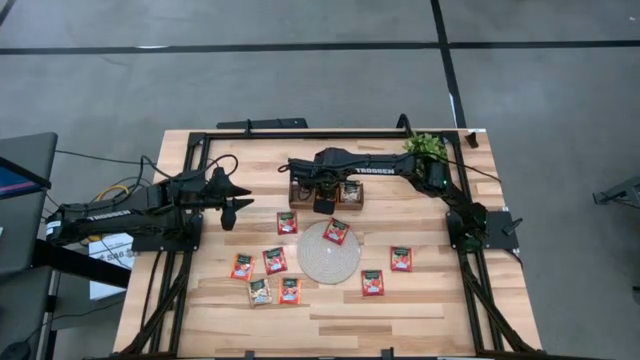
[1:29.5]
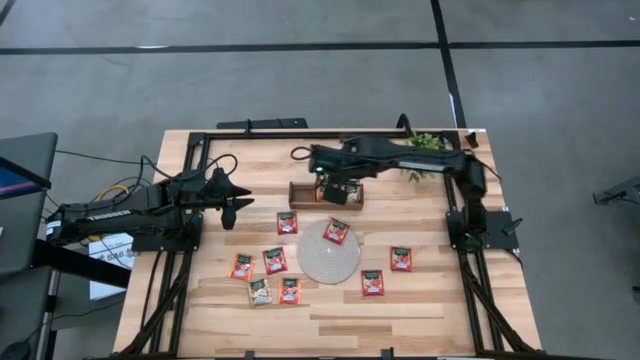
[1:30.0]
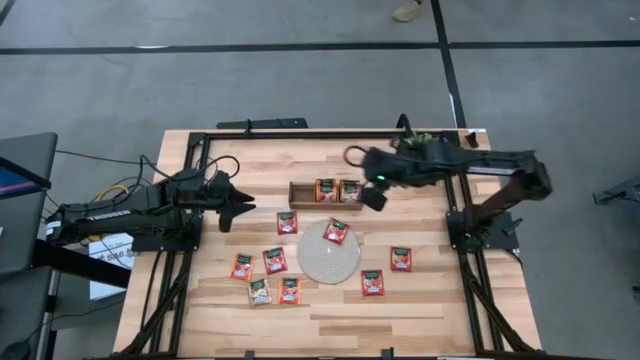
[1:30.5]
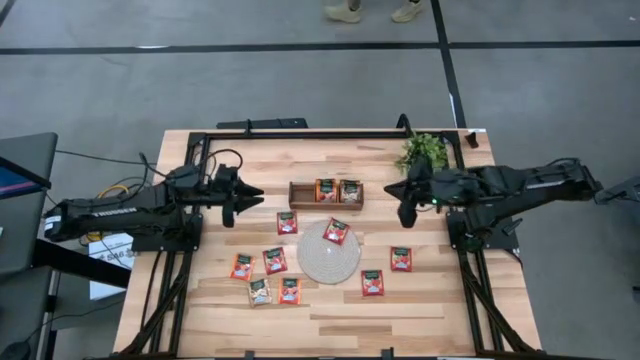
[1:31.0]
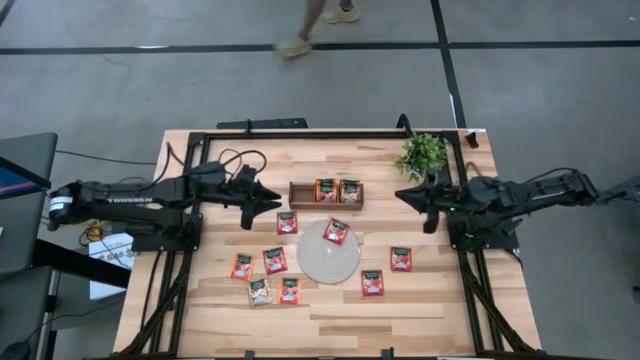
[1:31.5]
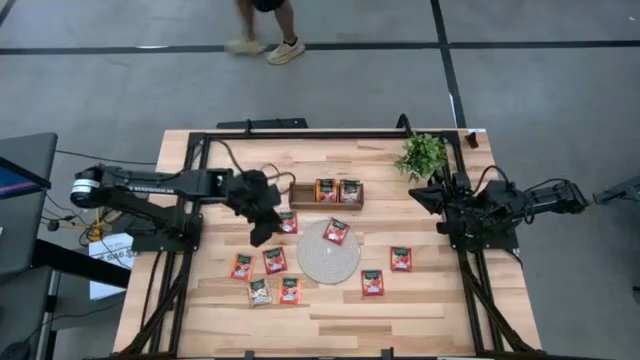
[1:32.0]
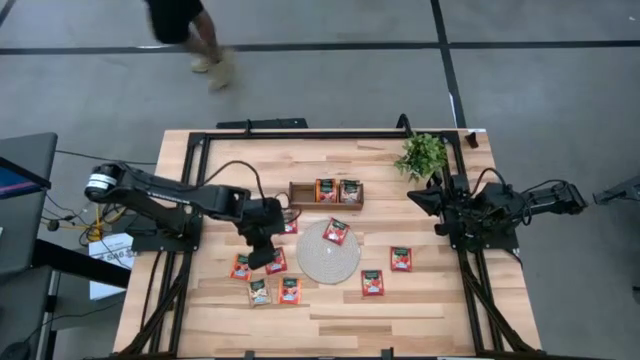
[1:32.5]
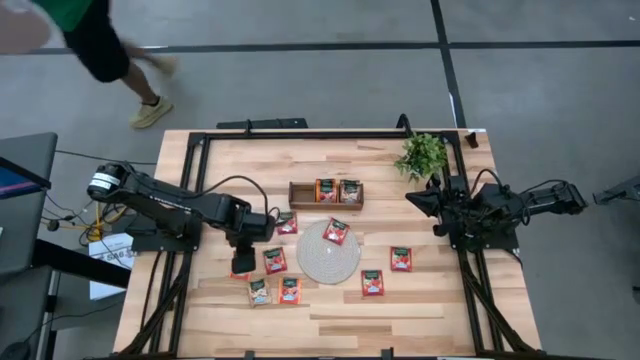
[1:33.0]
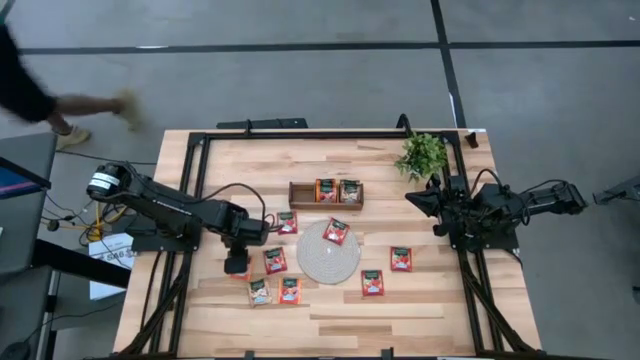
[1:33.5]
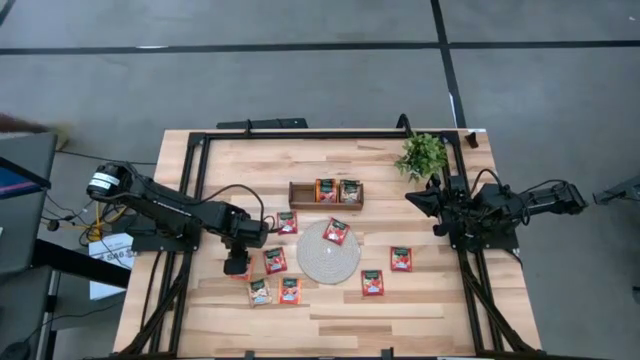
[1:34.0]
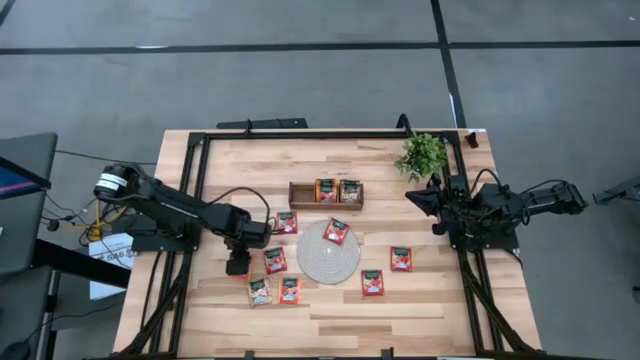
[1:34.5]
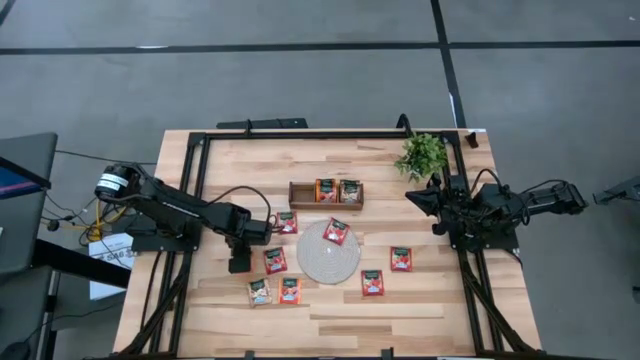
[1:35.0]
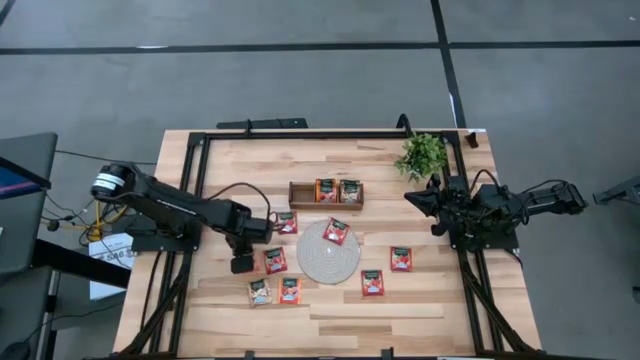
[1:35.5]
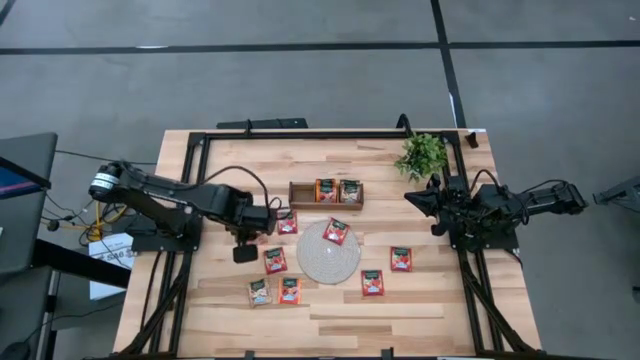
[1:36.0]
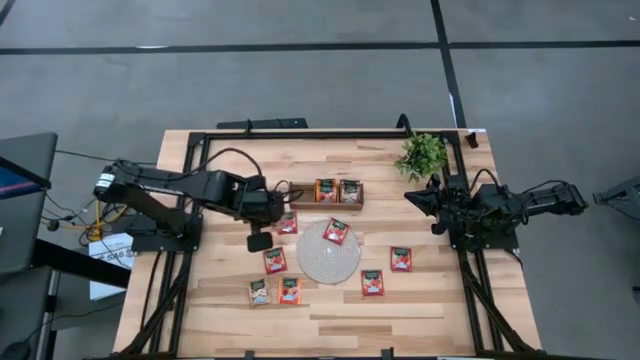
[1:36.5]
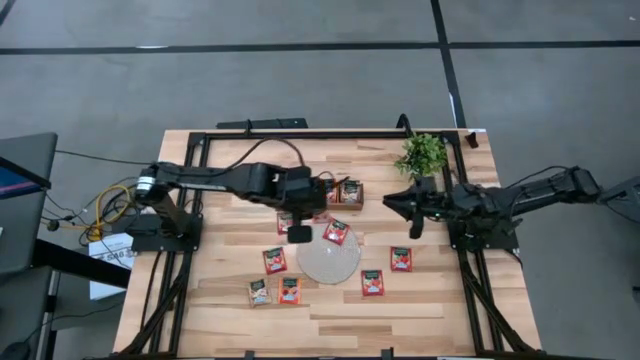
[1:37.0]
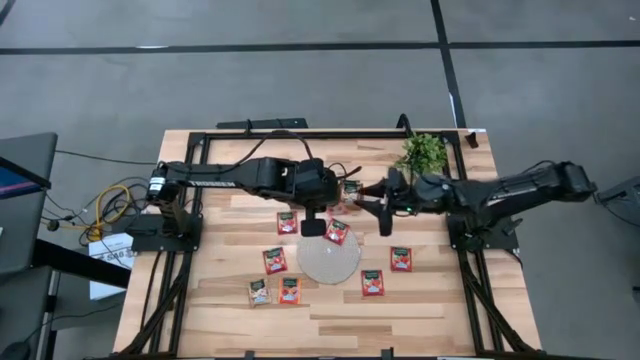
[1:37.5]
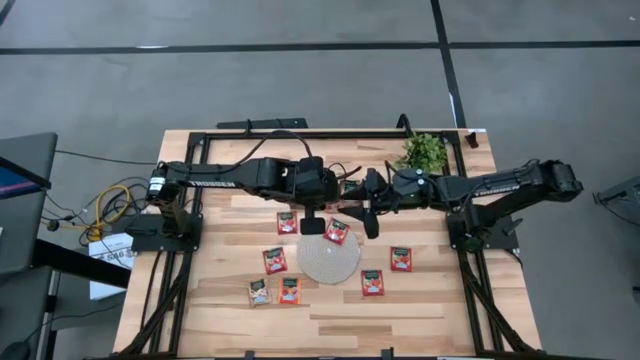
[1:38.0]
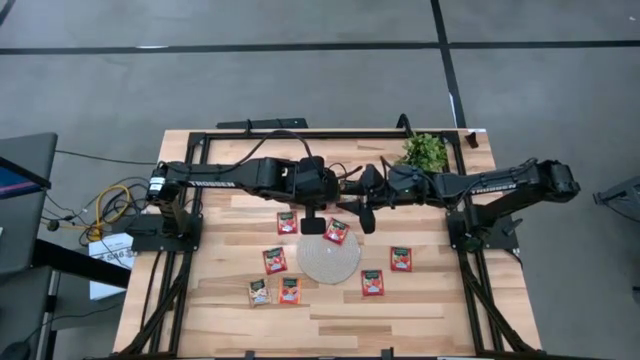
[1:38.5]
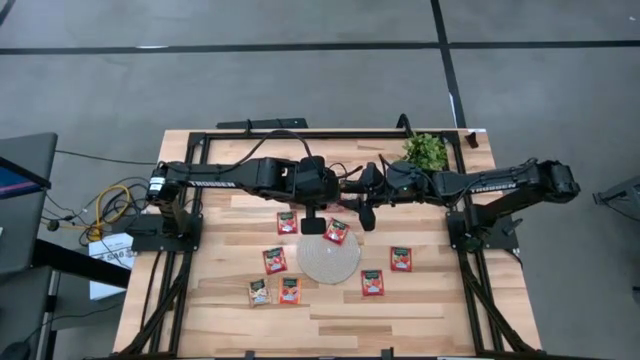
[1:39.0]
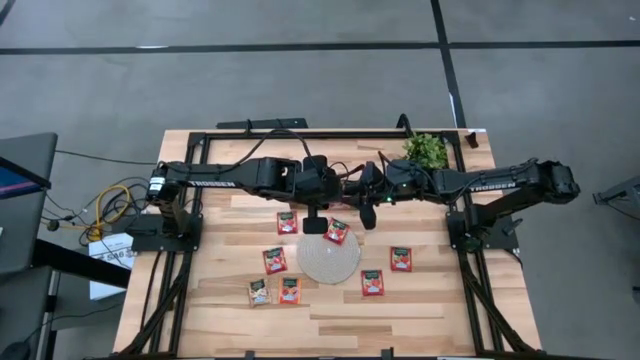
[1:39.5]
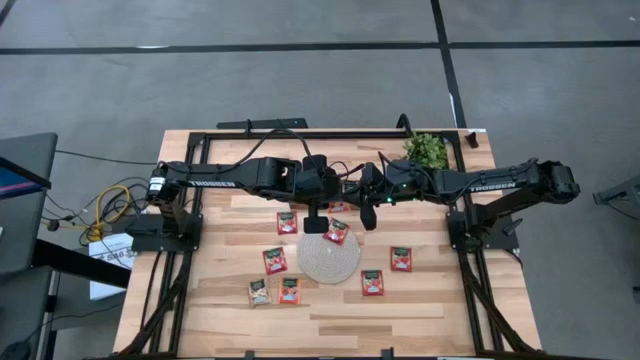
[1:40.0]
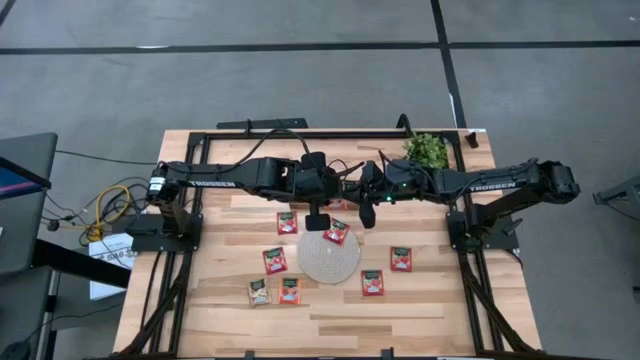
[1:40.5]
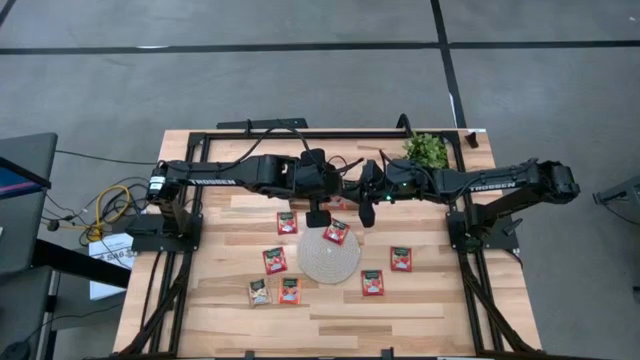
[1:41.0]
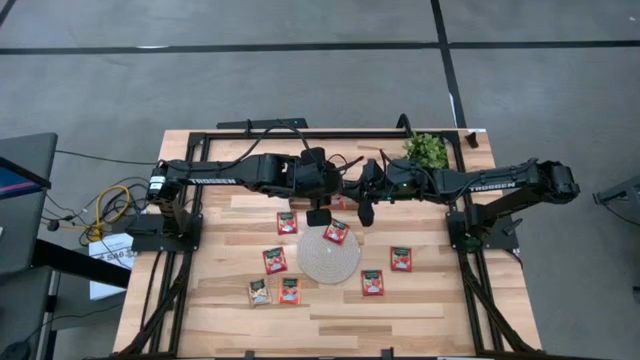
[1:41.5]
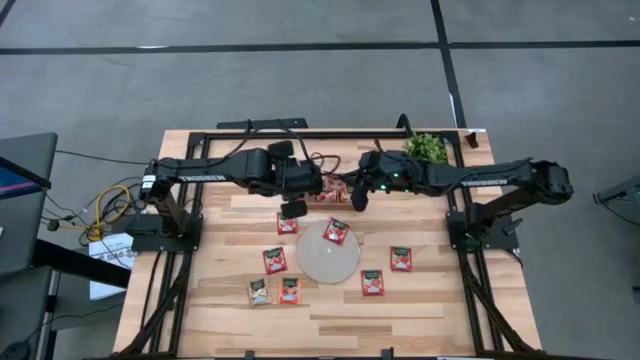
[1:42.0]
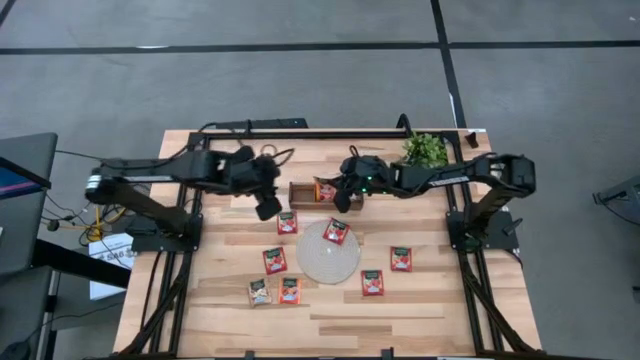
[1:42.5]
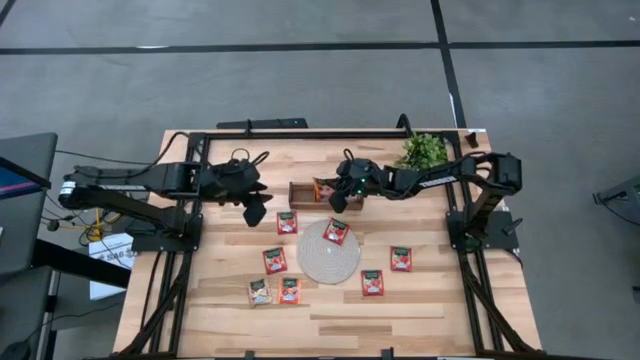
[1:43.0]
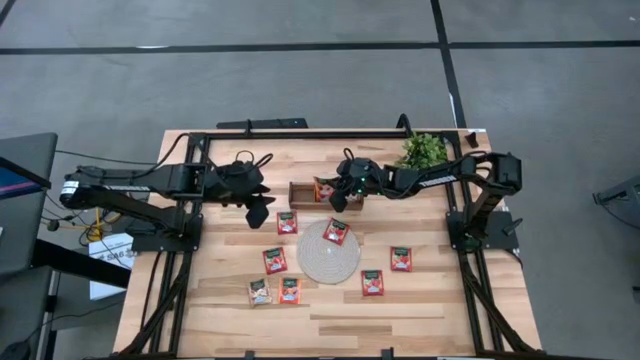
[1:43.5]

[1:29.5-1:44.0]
Task: Pick & Place Tea
Put the orange tea bag into the middle section of the wooden organizer

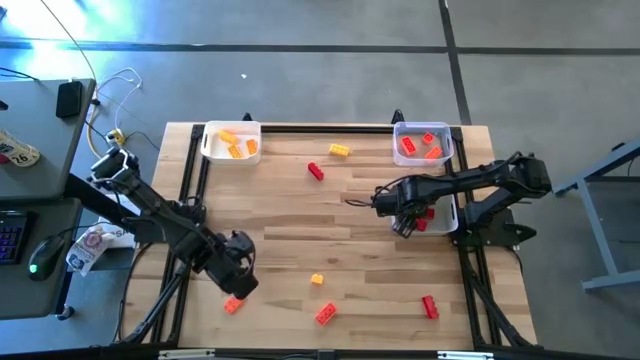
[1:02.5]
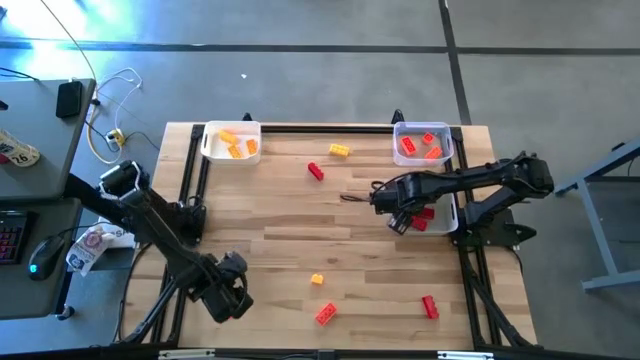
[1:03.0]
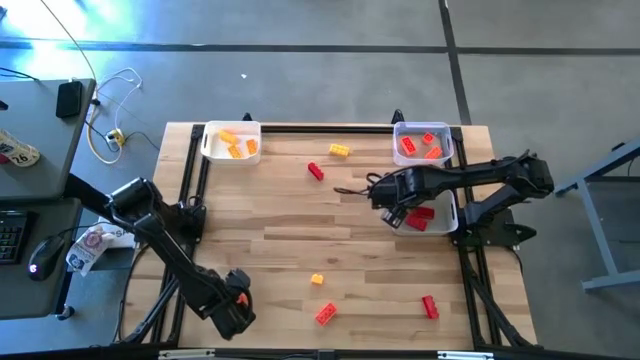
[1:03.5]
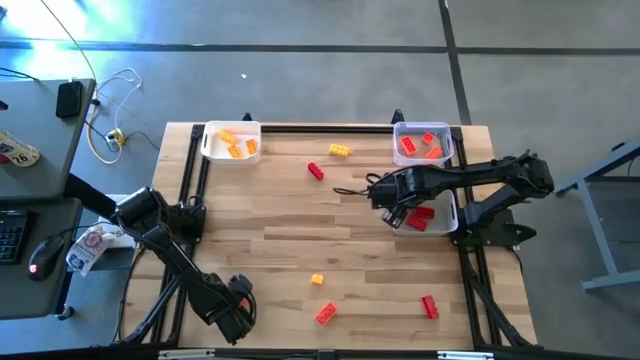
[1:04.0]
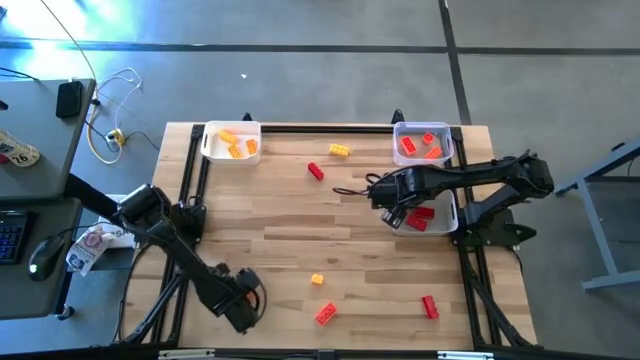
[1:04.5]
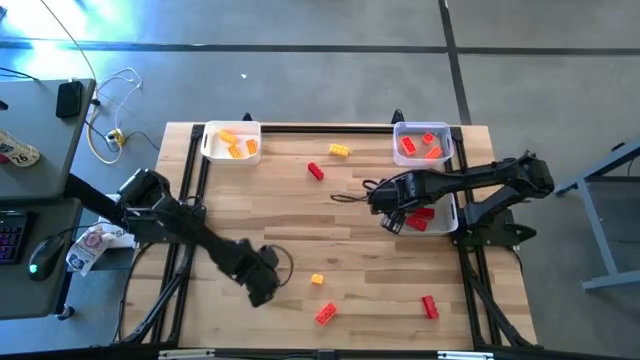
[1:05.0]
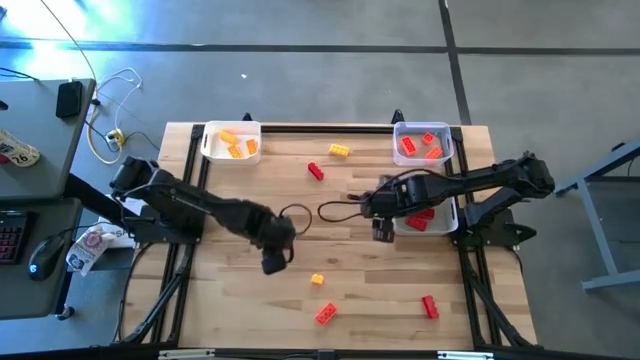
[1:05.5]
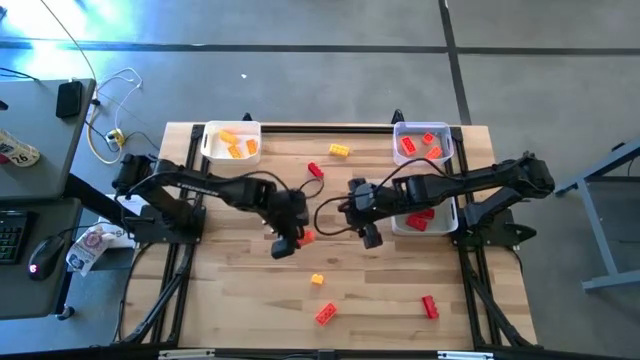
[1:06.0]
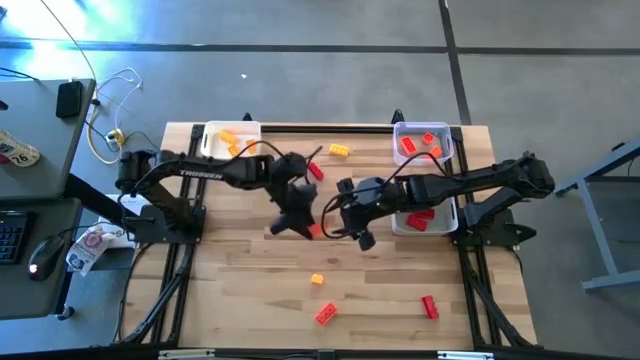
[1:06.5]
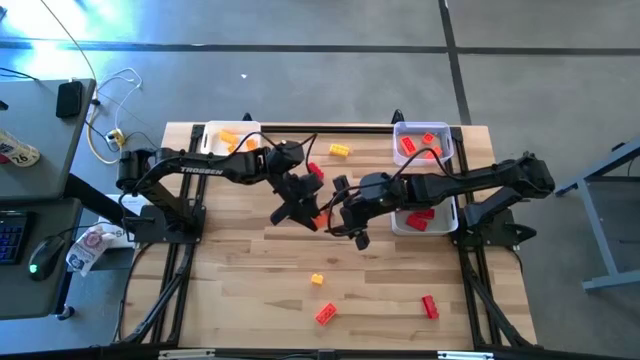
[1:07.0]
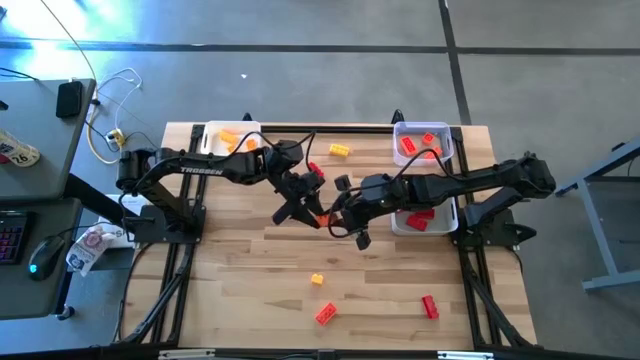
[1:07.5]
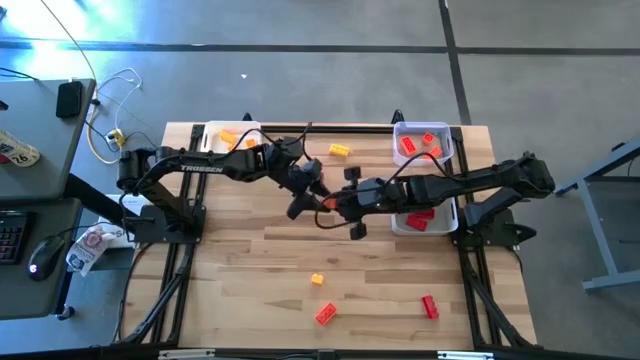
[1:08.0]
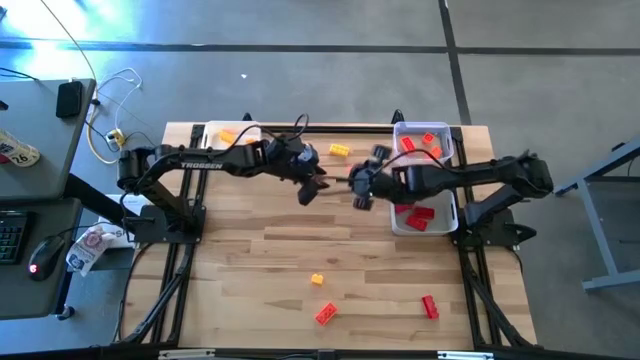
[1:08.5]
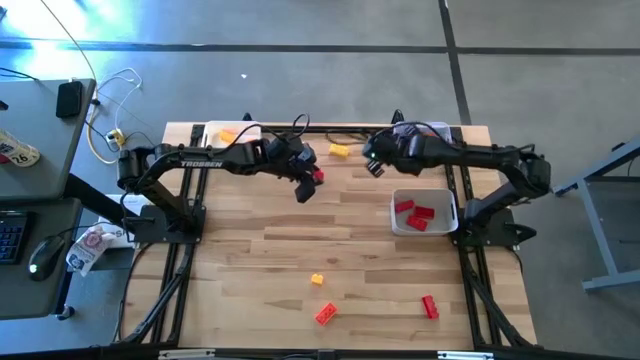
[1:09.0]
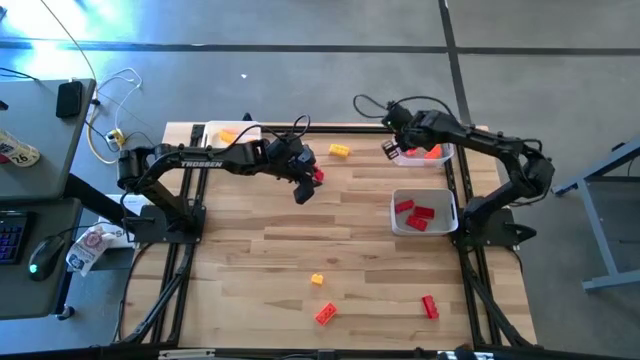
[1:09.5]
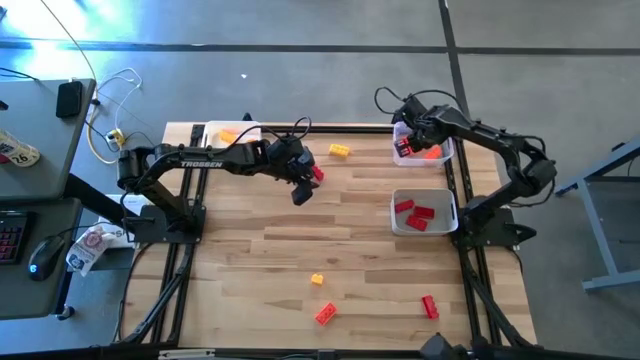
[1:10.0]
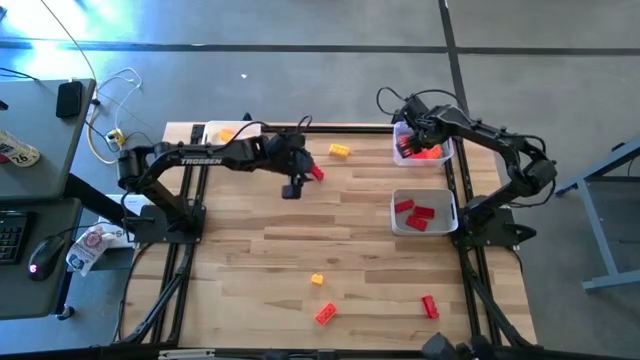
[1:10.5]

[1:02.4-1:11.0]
Task: Sort & place blocks by color
Put the orange game piece into the transparent bin
